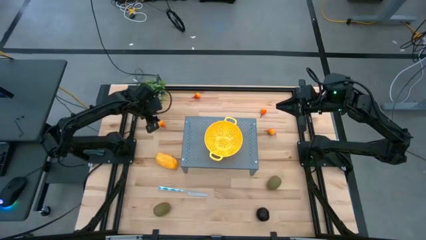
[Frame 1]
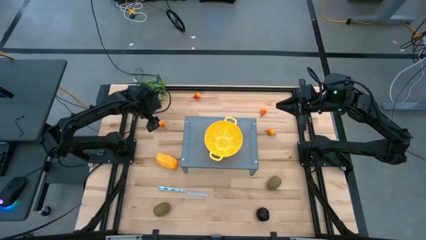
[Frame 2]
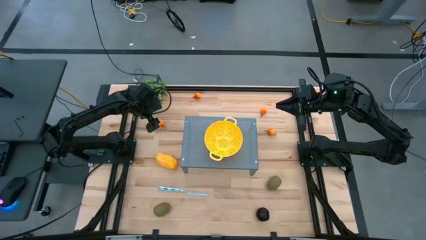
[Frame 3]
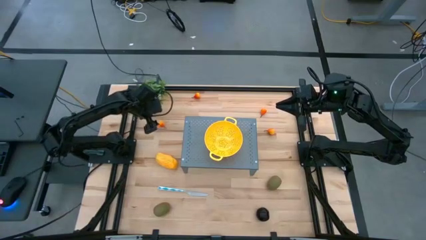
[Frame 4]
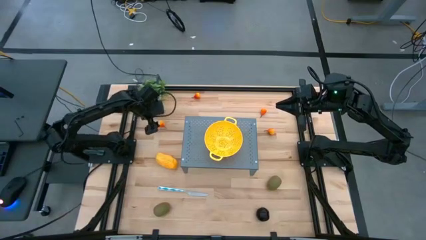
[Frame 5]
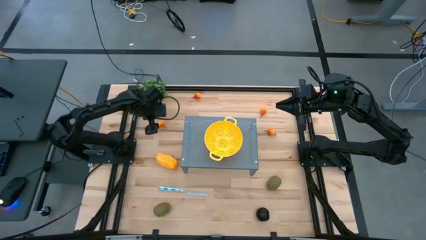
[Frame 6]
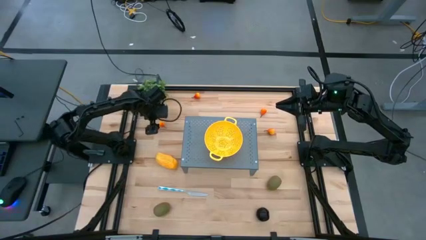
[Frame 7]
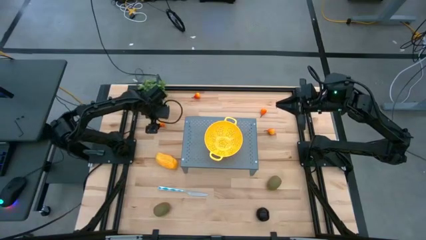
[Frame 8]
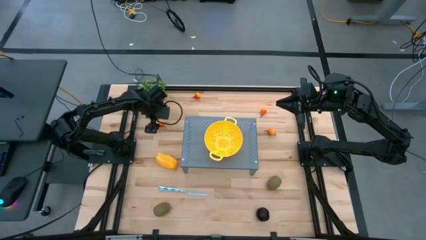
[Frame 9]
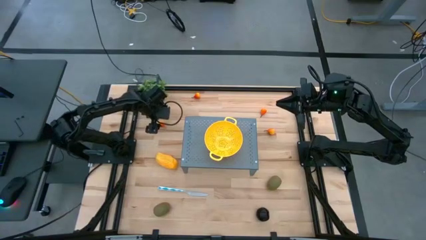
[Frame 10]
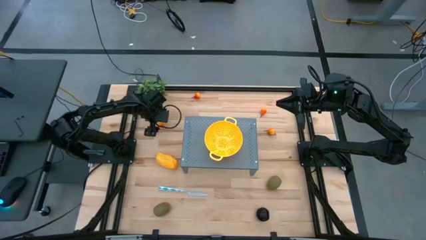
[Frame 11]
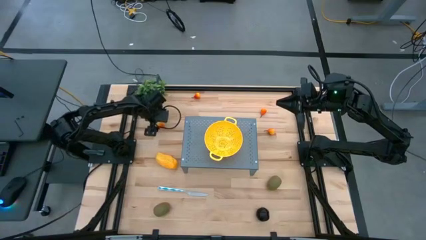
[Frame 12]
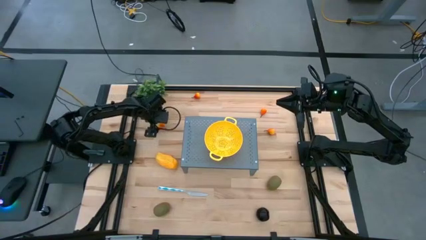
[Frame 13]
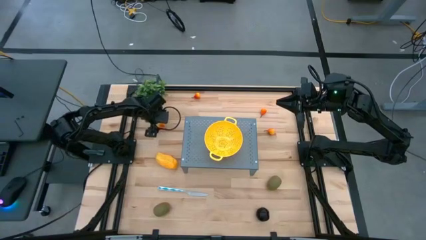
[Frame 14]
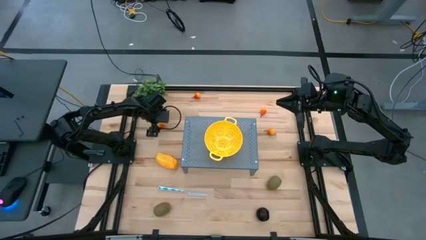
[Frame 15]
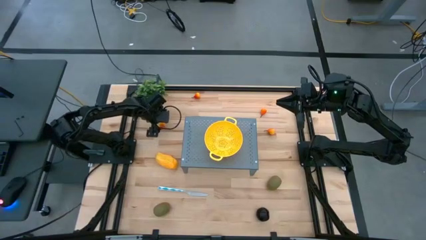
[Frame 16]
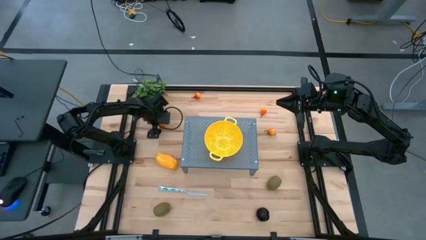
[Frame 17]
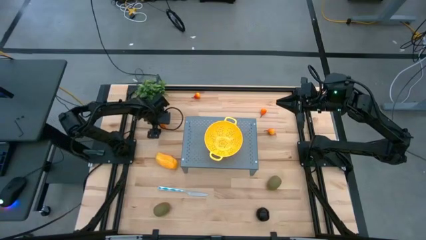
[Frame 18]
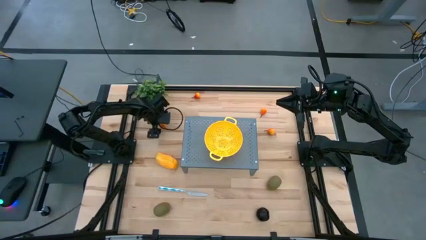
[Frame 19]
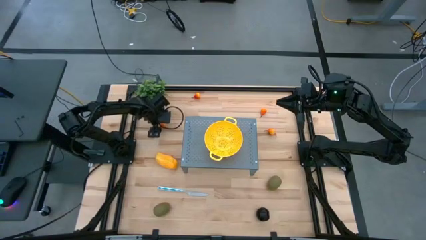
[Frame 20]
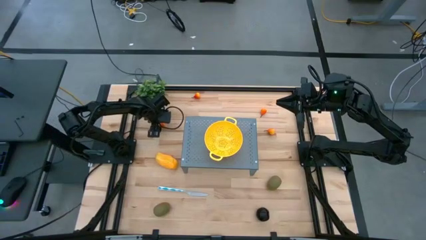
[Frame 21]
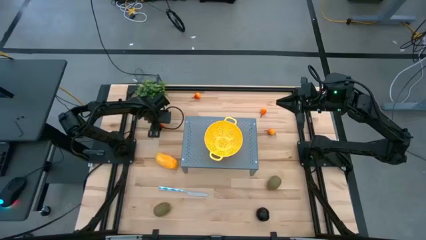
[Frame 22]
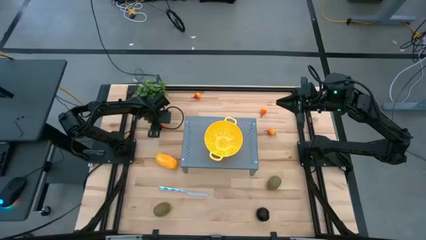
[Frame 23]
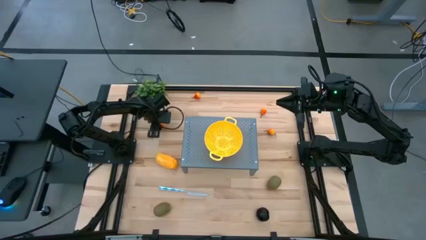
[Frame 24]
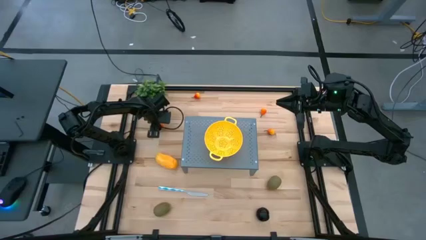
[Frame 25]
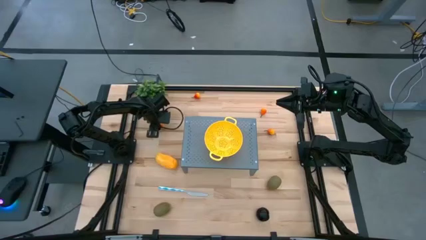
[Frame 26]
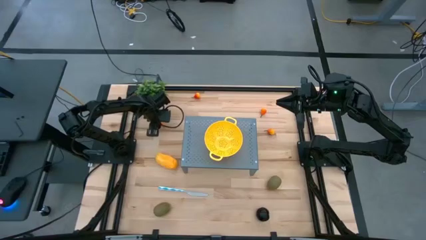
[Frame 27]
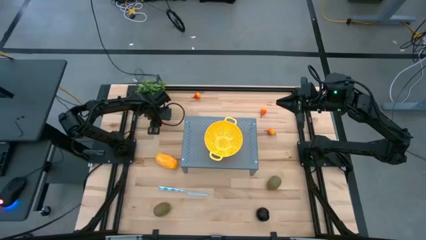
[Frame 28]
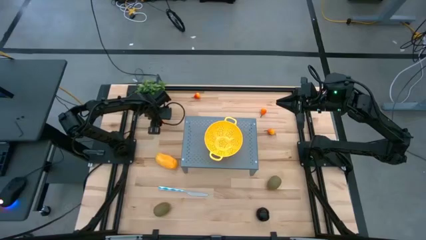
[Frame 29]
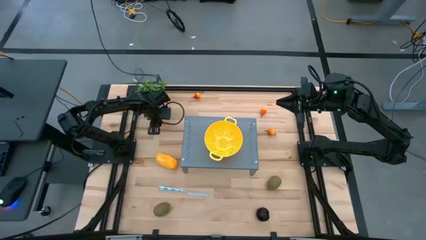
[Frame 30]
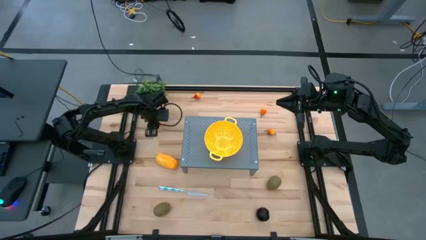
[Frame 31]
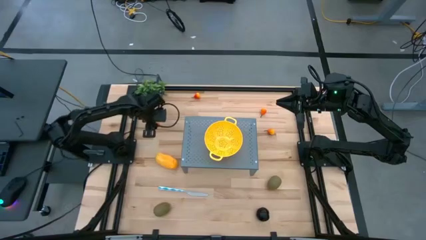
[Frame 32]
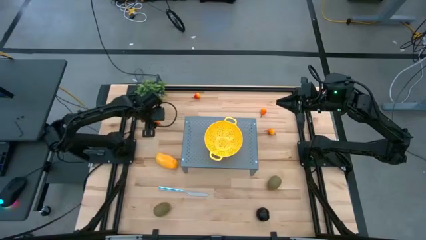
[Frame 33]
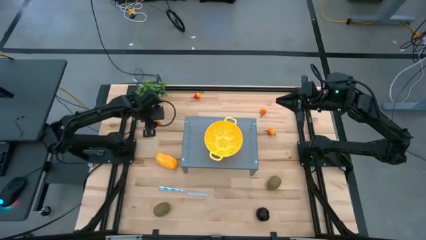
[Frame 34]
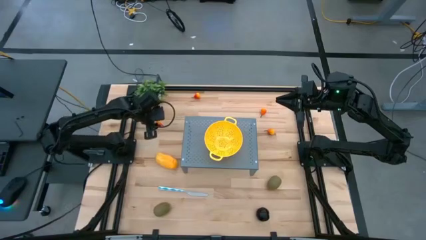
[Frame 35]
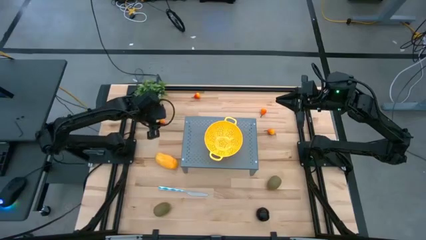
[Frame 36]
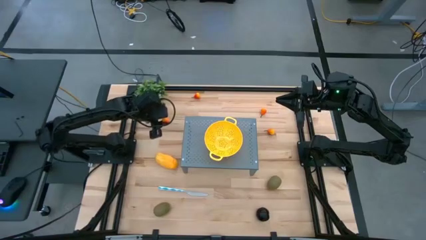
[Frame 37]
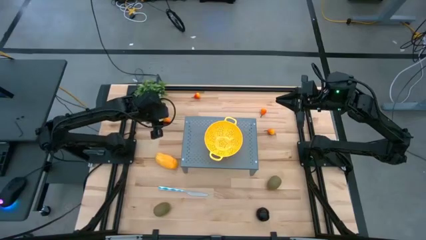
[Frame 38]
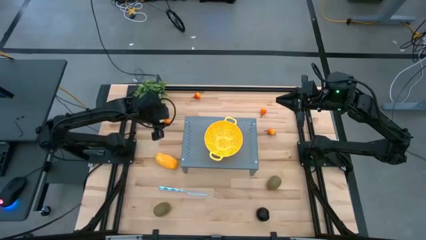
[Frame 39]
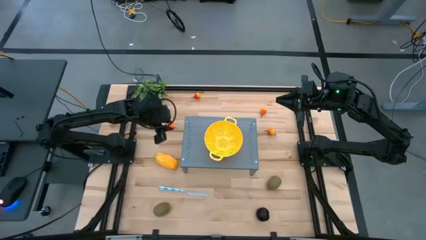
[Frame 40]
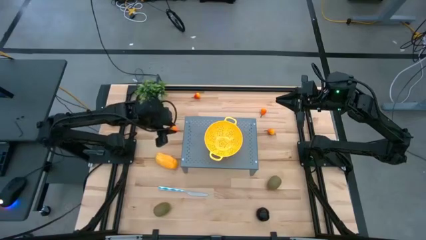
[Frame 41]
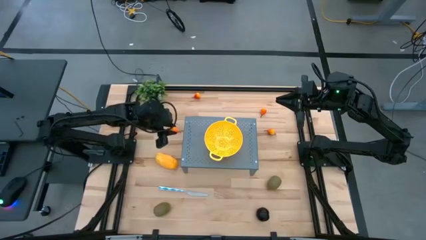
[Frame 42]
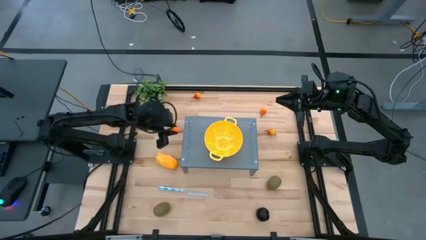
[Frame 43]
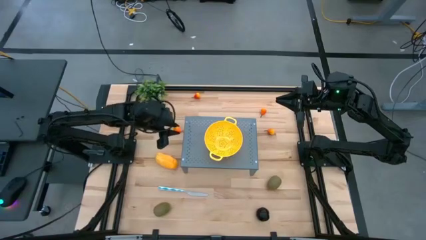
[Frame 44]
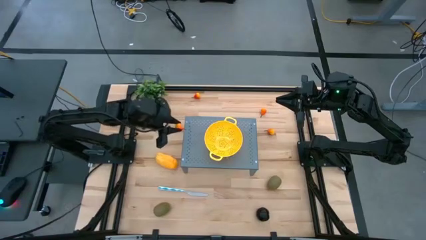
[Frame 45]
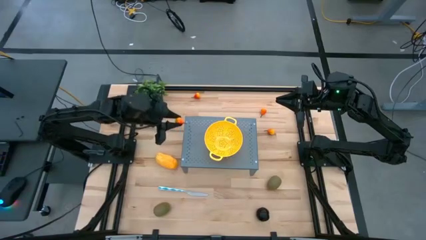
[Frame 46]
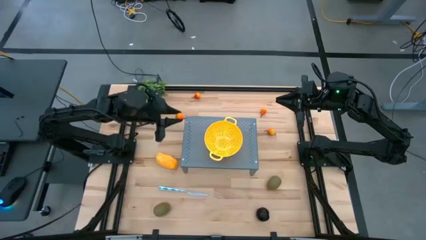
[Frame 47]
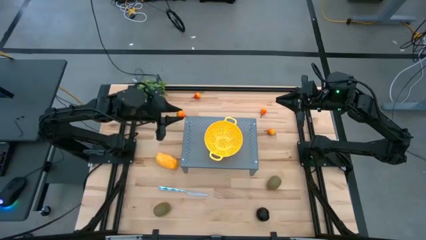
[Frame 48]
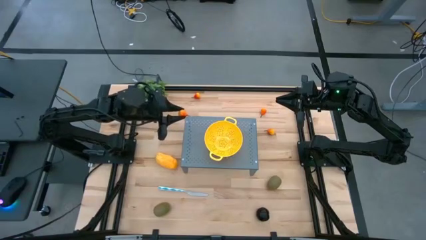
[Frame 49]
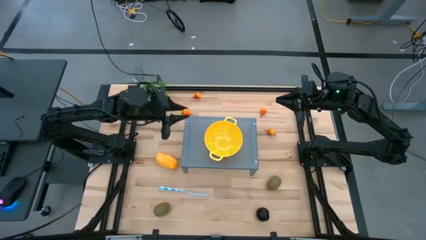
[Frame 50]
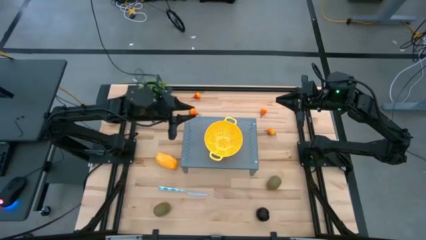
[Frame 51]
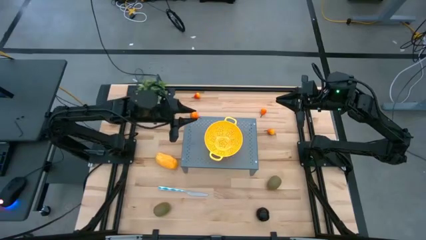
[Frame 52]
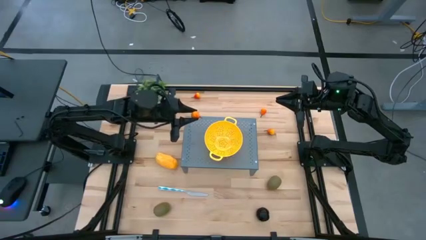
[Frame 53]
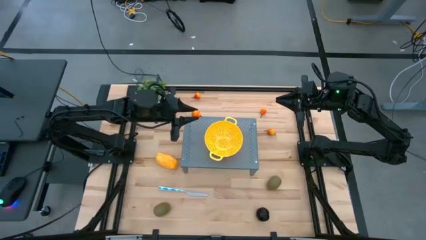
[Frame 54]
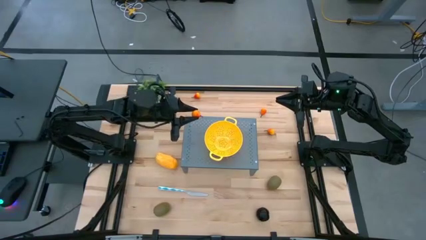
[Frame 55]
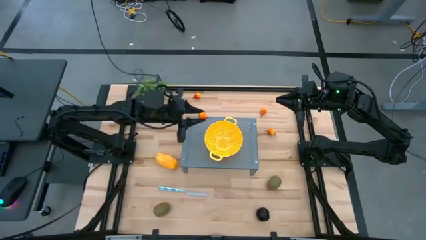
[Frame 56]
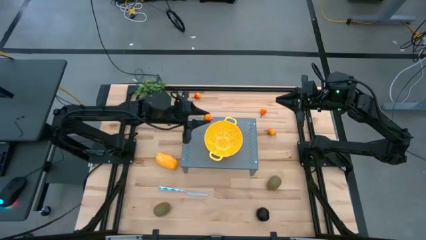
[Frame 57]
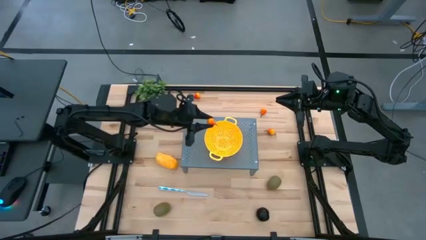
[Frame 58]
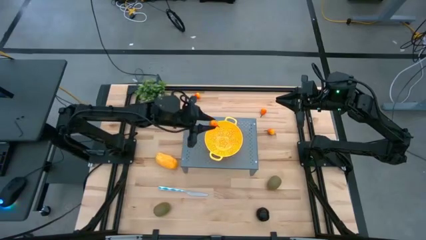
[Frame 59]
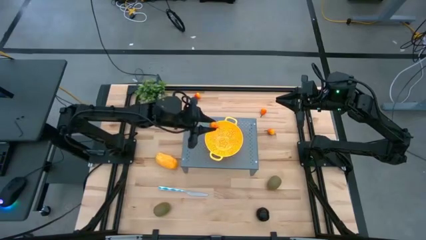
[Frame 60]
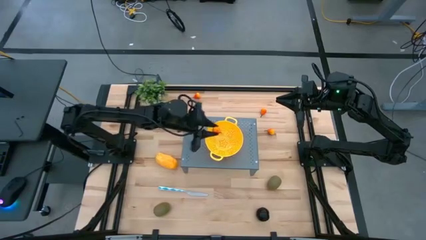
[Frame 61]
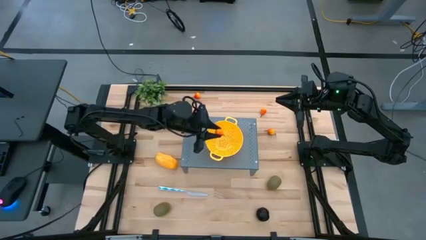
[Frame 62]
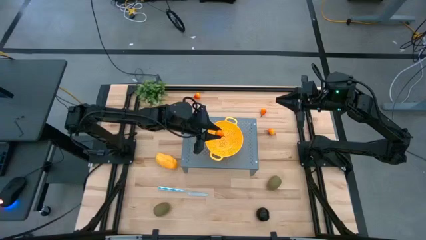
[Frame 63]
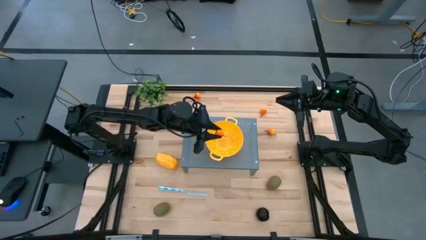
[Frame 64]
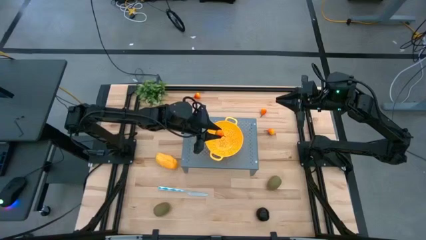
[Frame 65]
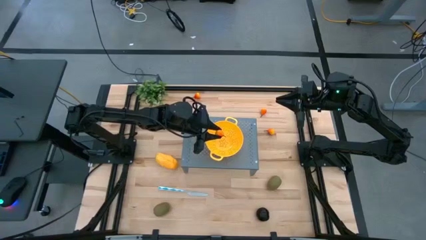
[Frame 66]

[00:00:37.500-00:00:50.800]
Task: Pick & Place Fruit
Put the pear into the strainer bowl on the shelf

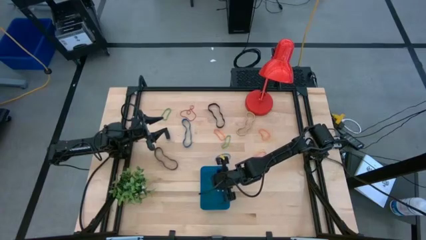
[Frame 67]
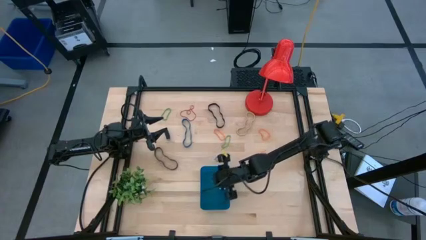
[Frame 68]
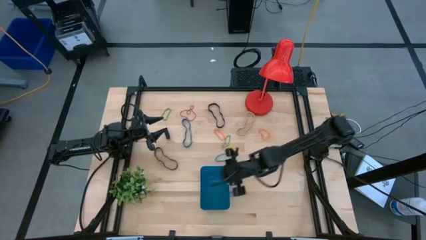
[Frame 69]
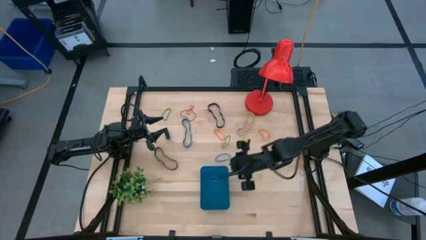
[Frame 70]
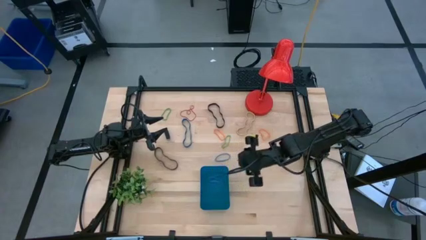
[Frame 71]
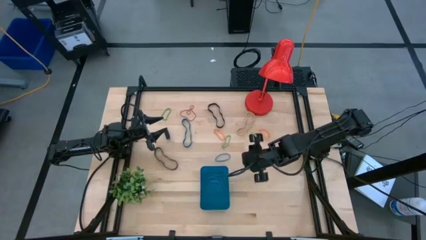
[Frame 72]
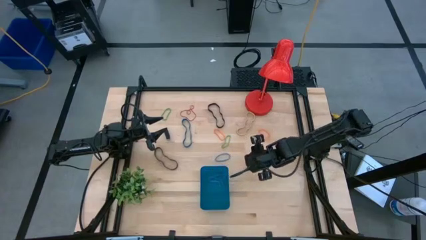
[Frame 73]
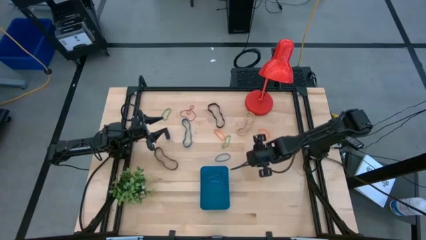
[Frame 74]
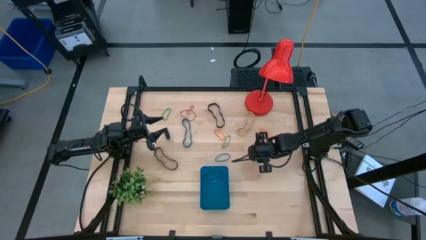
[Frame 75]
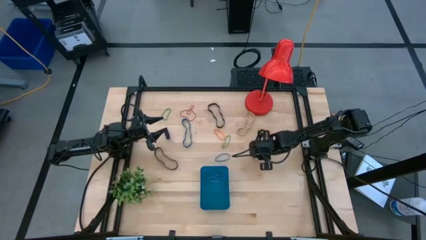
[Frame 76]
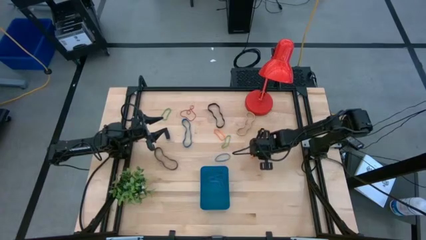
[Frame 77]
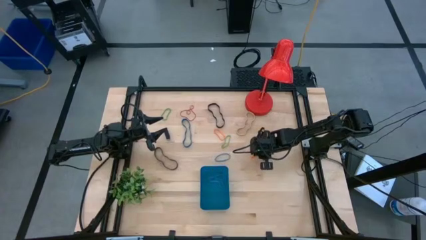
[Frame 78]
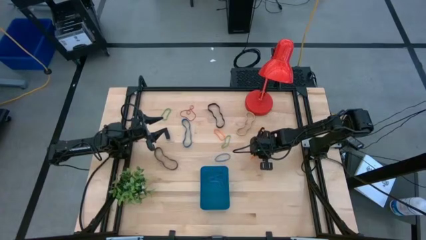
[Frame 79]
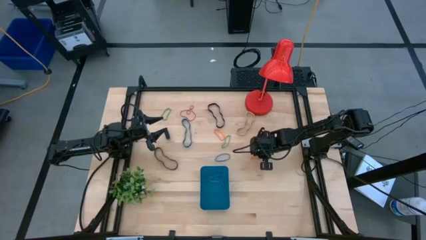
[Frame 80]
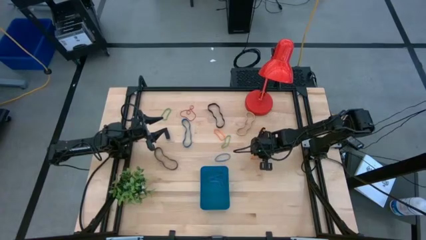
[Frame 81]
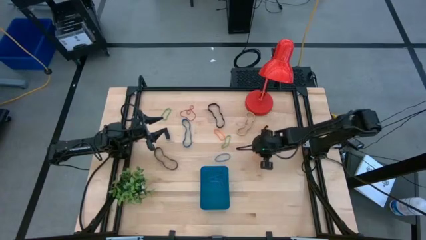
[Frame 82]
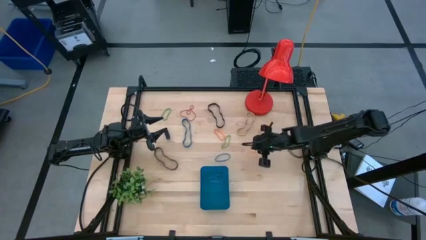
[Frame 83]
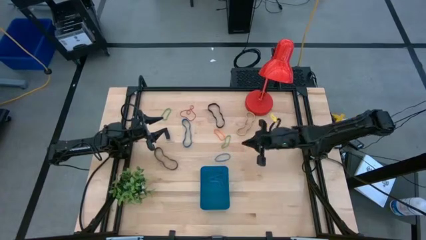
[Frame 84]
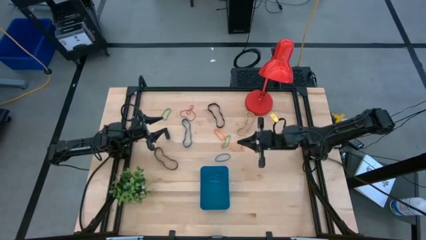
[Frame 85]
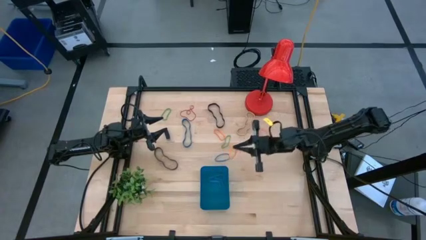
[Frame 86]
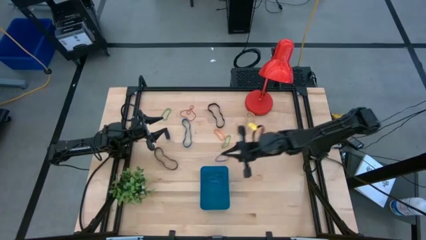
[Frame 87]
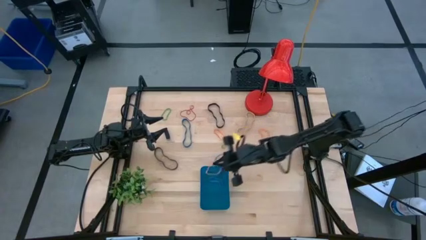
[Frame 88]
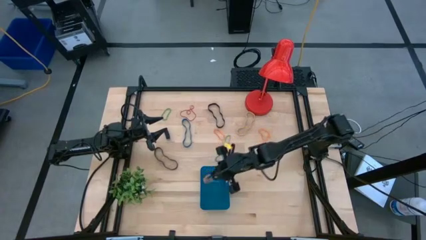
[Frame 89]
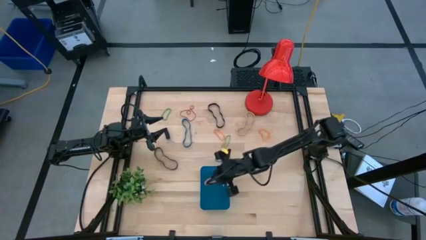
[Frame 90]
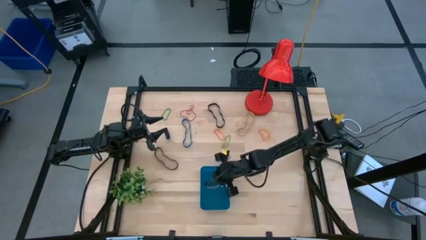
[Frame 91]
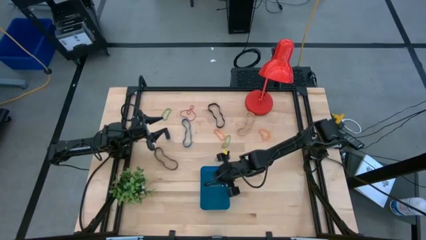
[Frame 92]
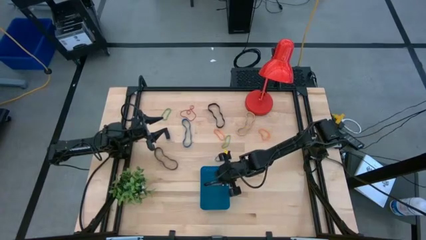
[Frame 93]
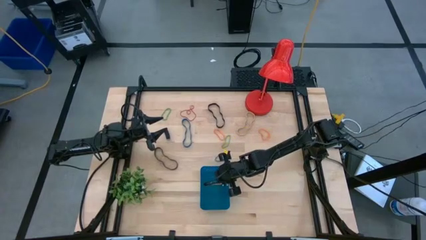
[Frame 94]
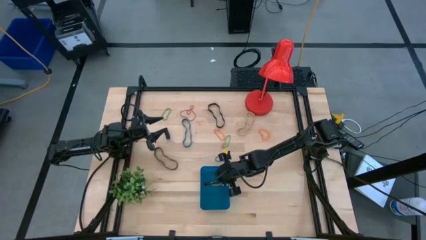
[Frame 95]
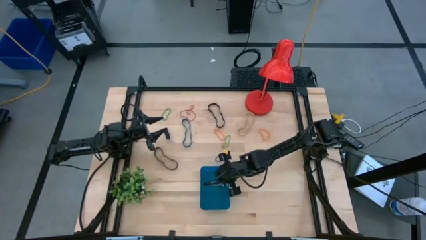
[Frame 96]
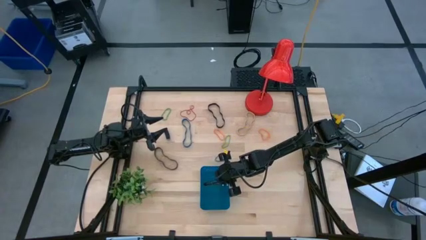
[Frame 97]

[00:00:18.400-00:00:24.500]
Task: Pick and place rubber bands into bin
Put the bottom orange rubber band into the blue bin
